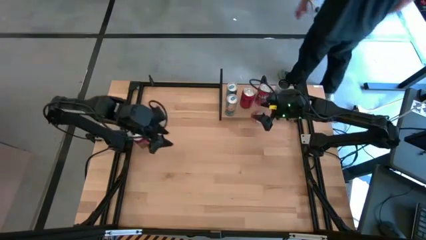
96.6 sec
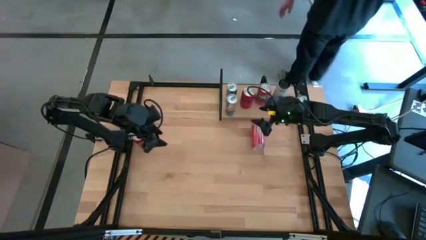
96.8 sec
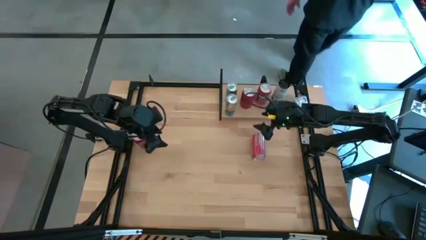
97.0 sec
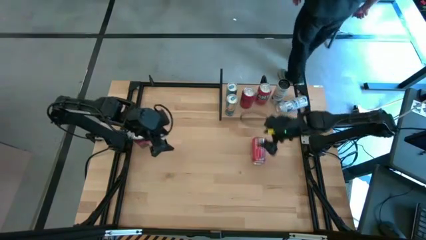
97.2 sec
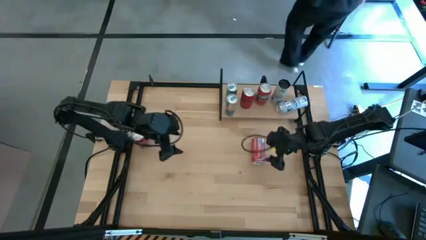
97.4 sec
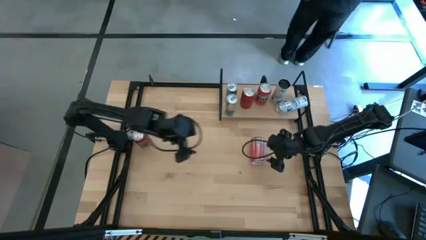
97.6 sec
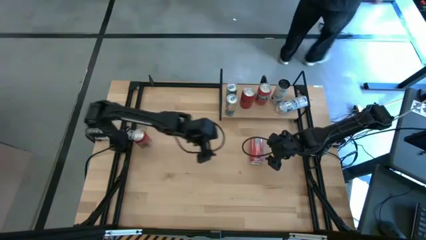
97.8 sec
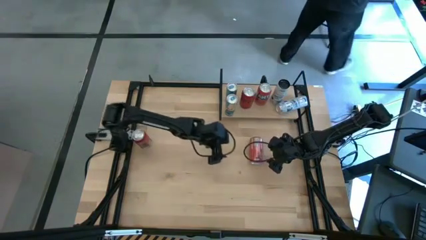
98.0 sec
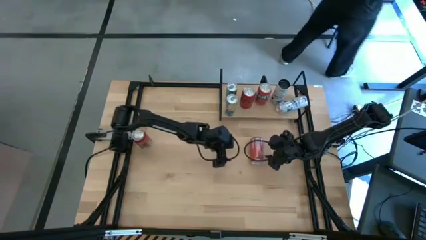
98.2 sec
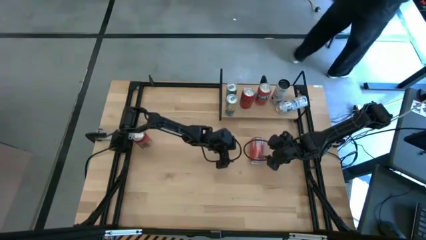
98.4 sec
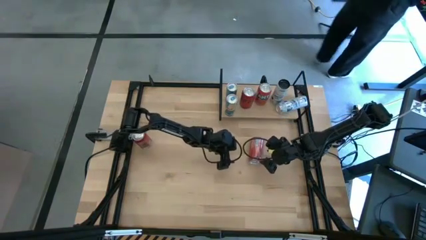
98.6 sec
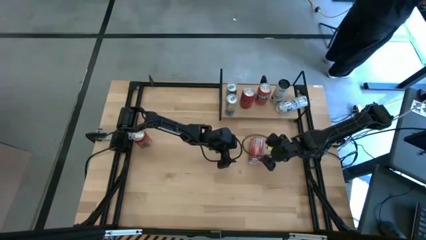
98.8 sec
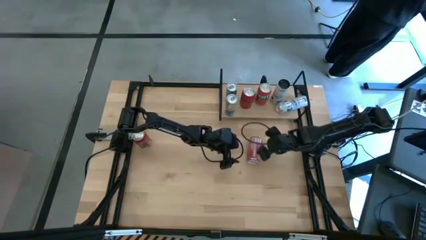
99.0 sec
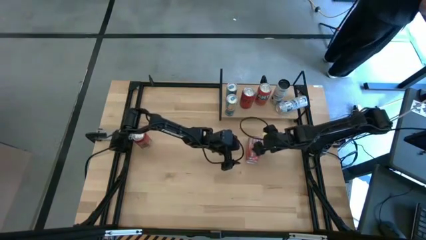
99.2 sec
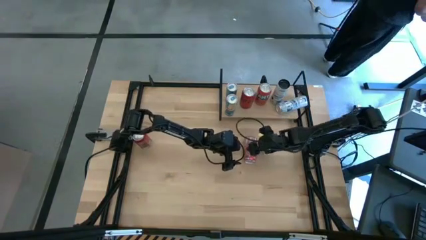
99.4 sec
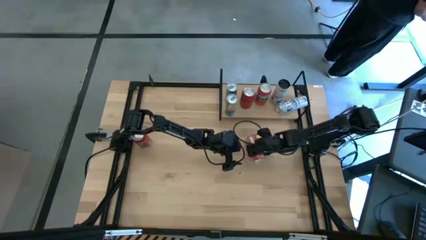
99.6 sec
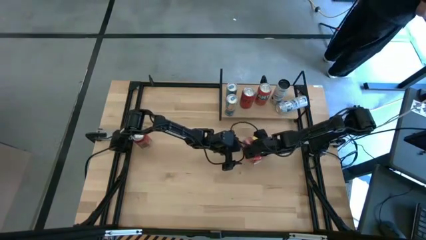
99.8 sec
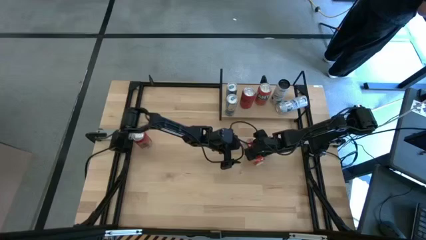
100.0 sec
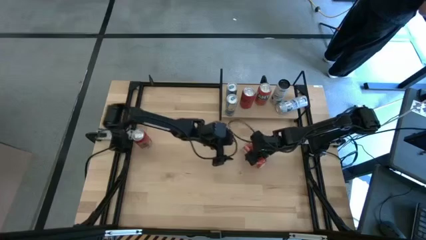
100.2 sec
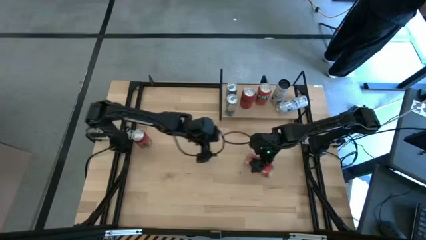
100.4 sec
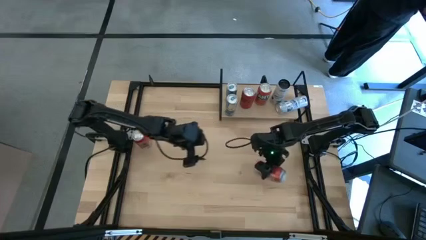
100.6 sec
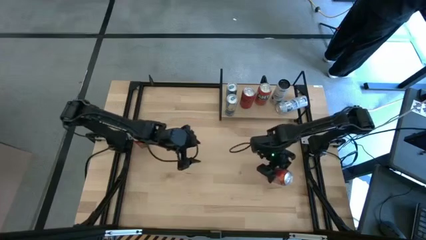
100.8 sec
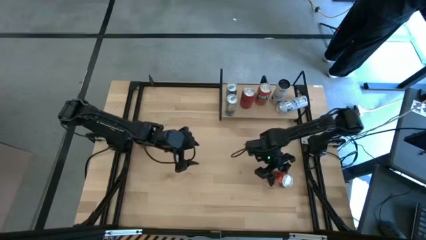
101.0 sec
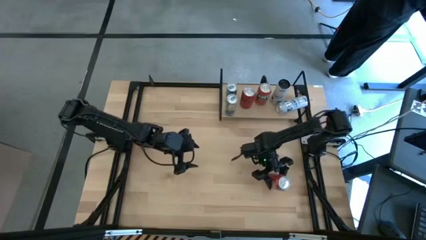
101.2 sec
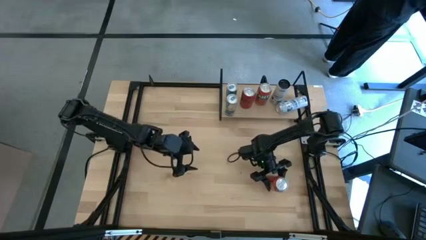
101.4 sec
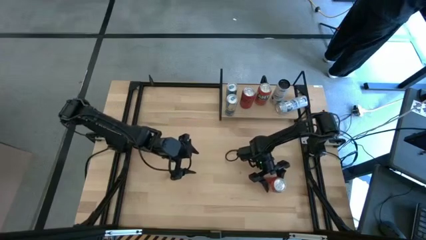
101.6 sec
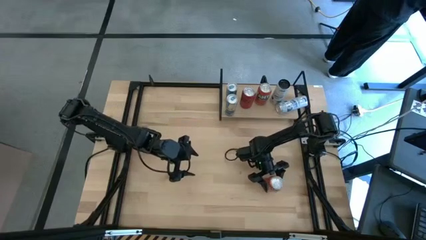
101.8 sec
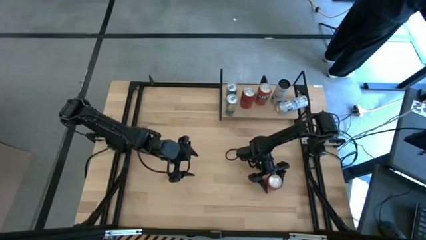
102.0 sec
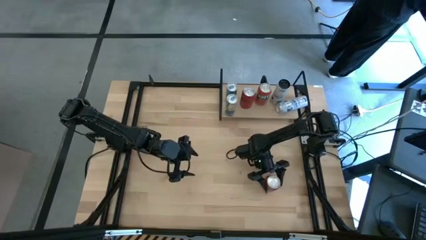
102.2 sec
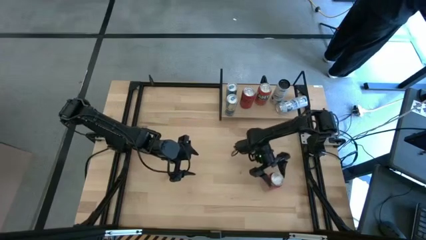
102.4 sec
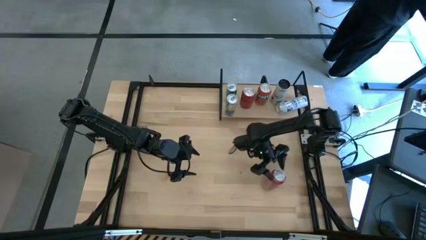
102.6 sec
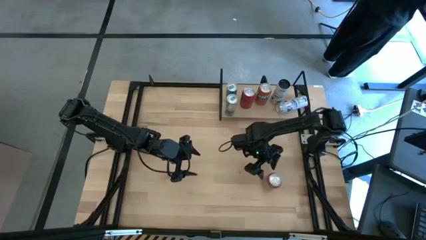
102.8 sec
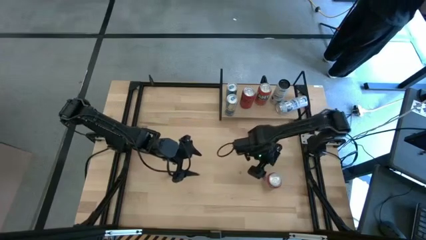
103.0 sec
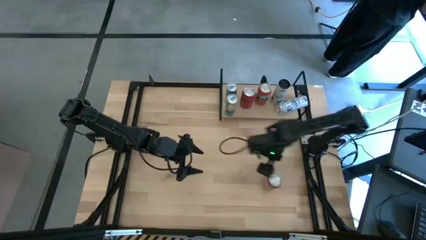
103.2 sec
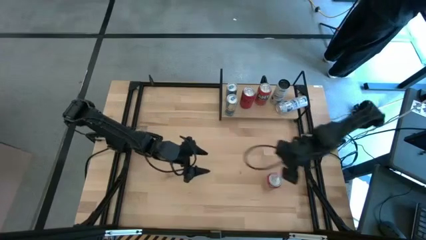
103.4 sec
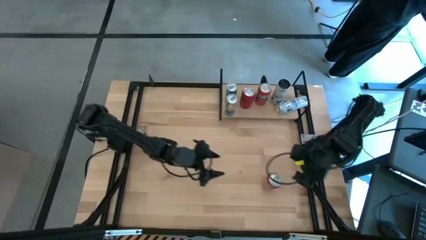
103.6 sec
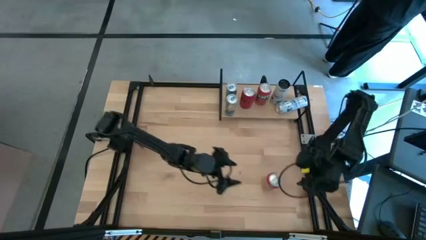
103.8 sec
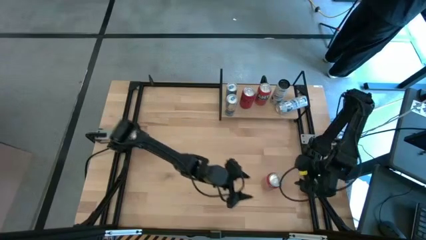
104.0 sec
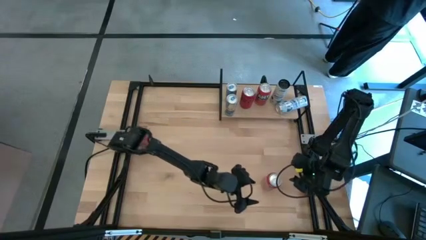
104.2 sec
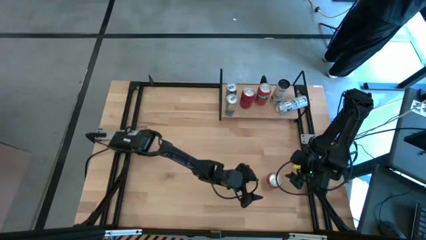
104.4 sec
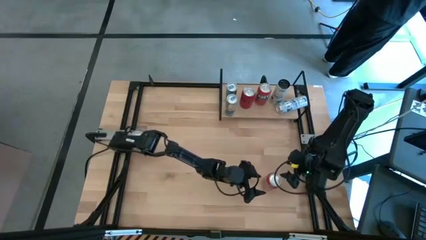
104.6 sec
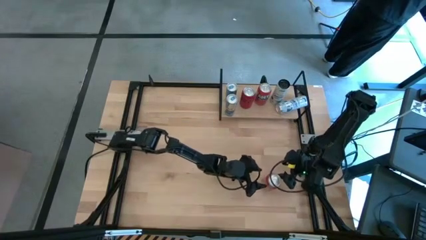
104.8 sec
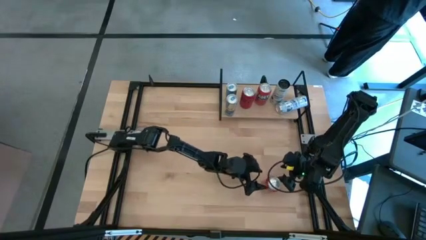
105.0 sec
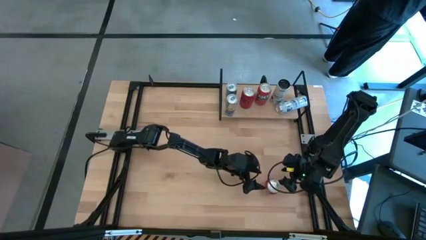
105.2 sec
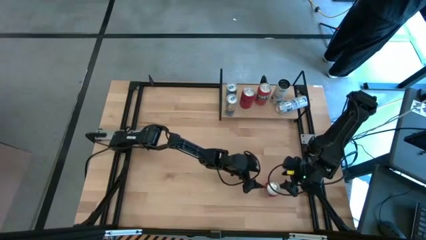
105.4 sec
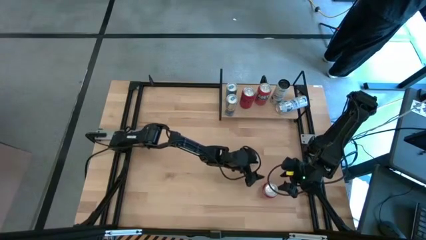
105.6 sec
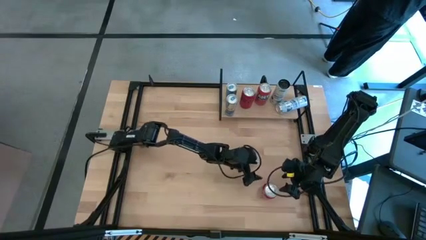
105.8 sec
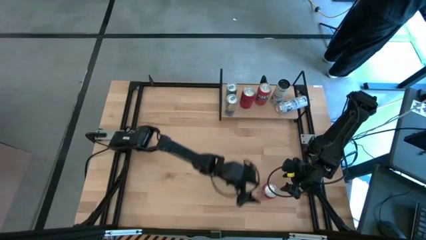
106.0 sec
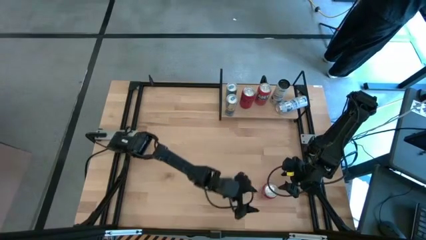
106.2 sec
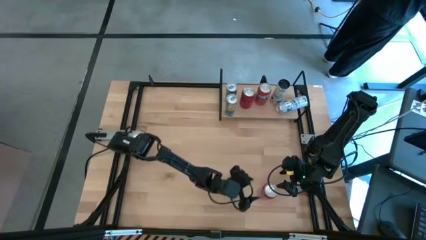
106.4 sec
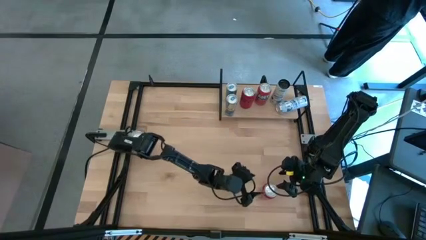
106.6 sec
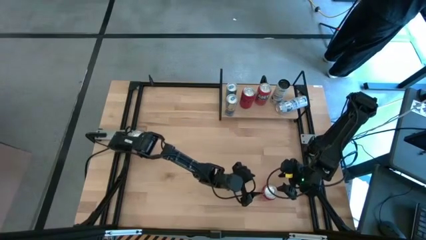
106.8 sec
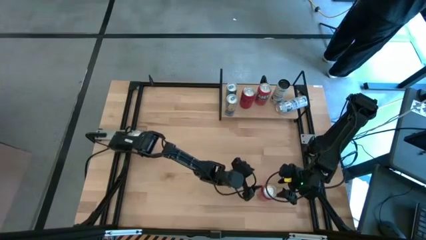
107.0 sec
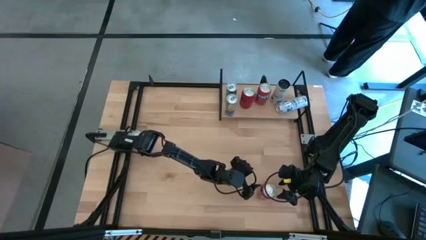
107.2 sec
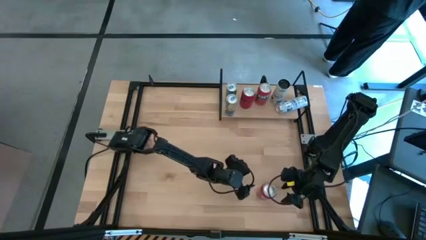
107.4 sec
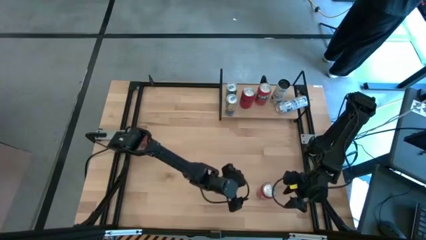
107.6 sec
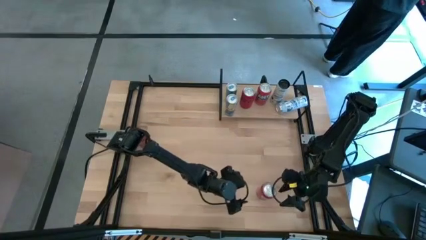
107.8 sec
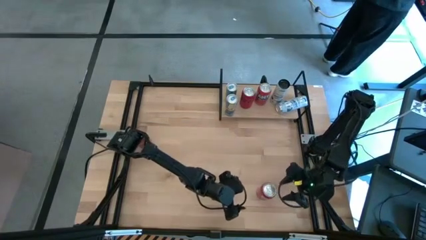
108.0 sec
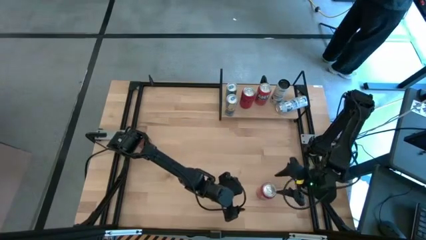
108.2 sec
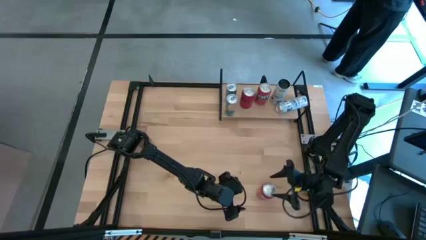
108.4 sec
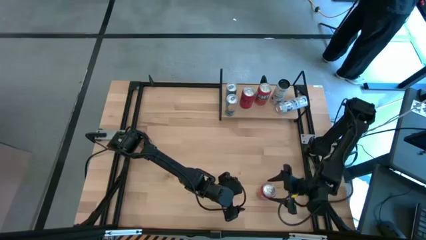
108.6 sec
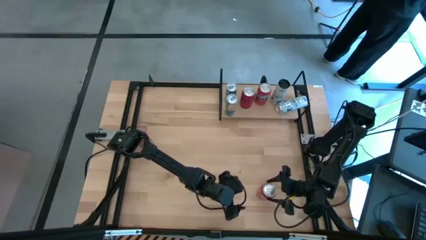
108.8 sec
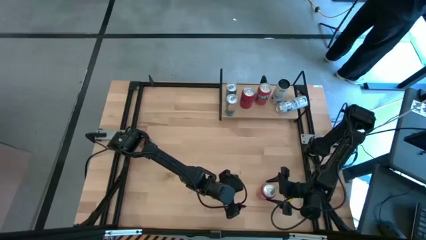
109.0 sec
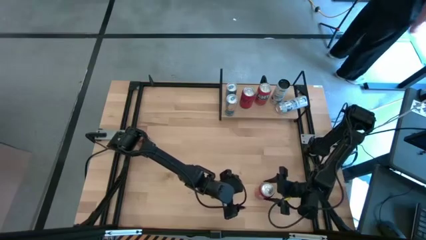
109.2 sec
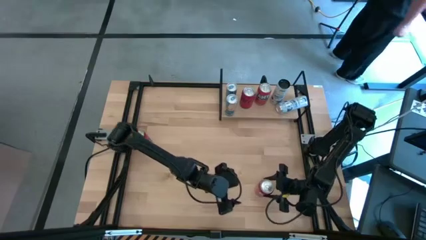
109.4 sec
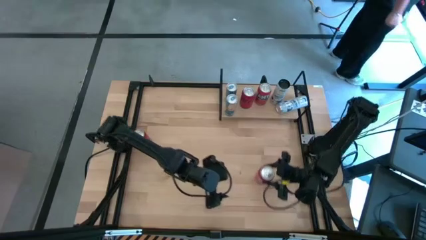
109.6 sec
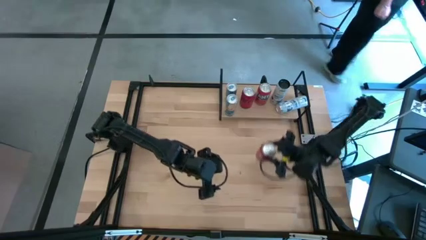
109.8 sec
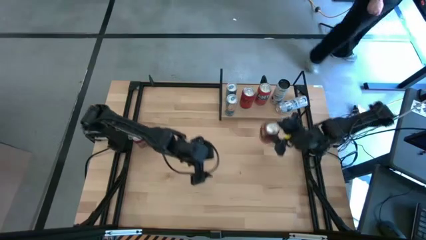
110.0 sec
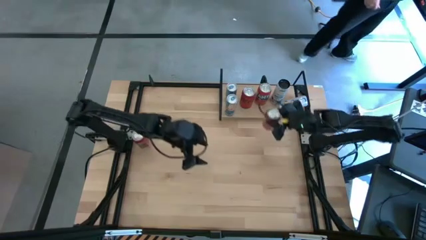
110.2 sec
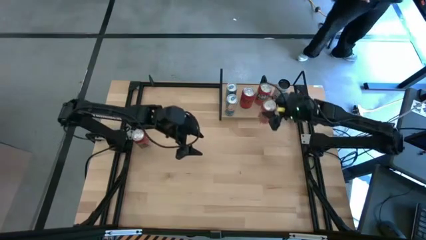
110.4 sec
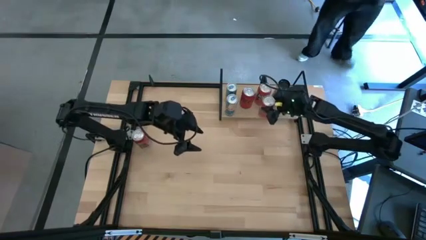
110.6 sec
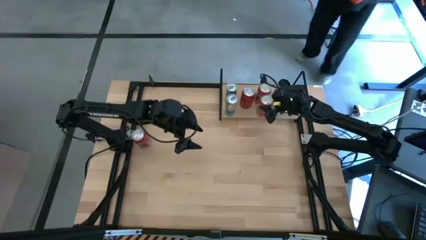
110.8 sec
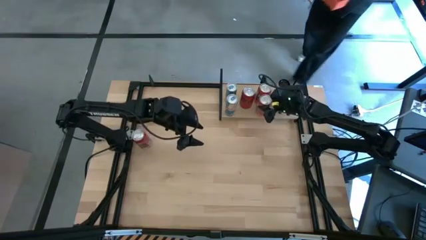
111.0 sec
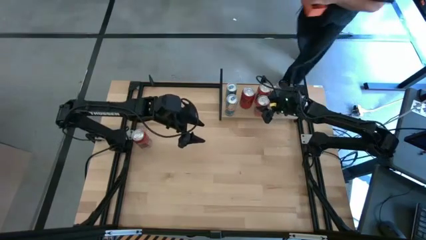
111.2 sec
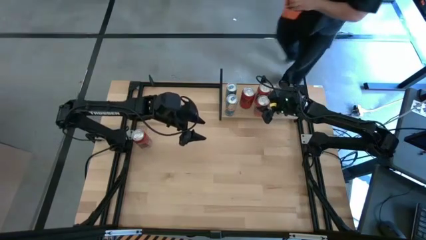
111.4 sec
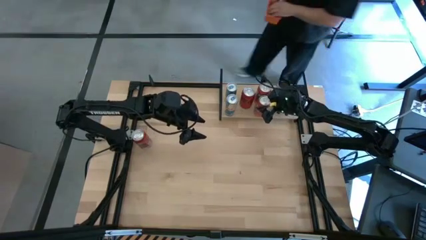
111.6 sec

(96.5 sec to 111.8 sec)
Task: Place canned beverage on shelf
Put the red soda can on the shelf aligned with the other red soda can
